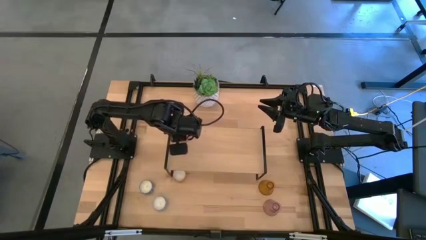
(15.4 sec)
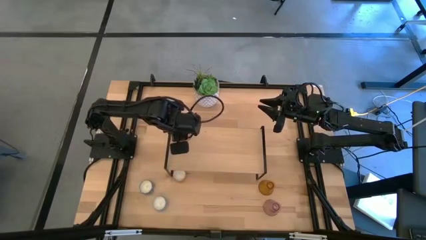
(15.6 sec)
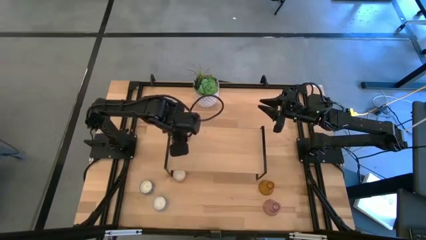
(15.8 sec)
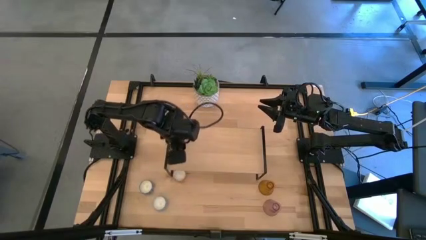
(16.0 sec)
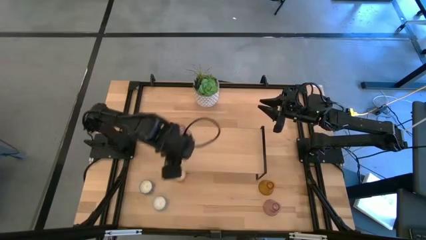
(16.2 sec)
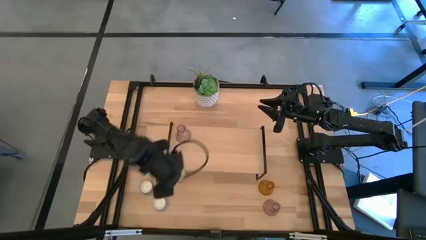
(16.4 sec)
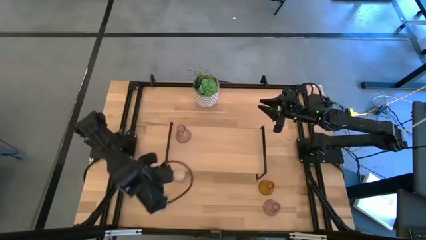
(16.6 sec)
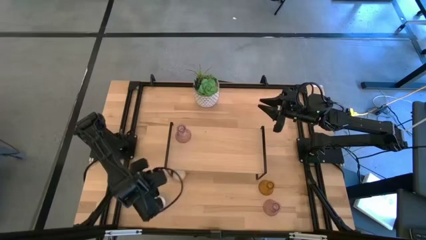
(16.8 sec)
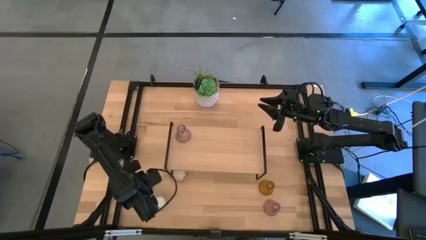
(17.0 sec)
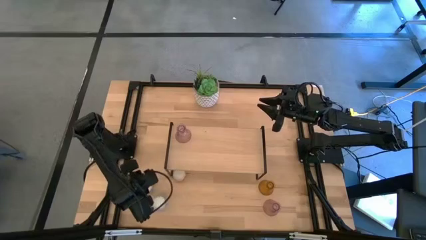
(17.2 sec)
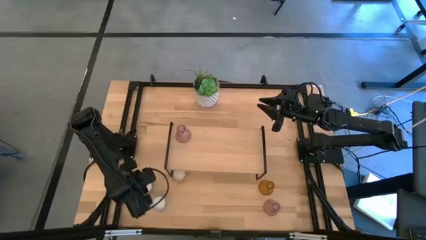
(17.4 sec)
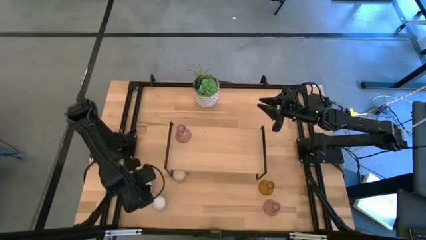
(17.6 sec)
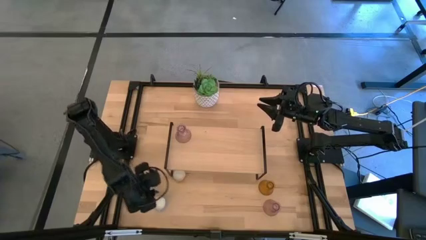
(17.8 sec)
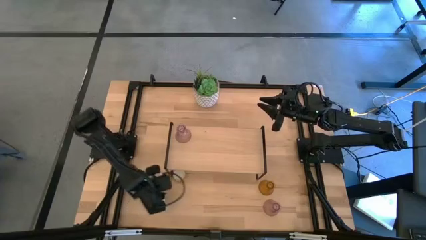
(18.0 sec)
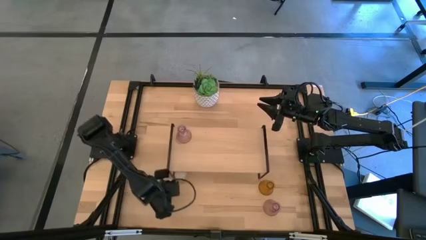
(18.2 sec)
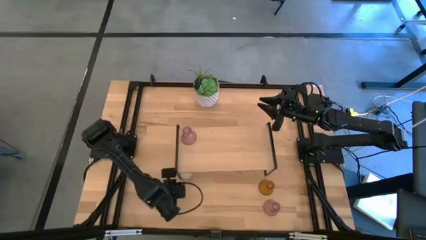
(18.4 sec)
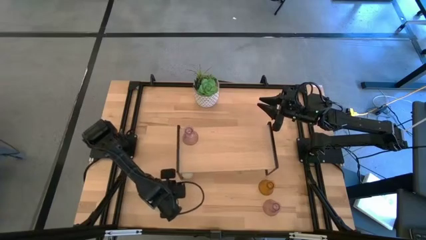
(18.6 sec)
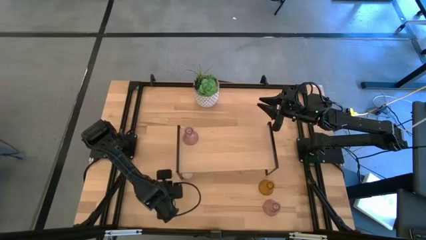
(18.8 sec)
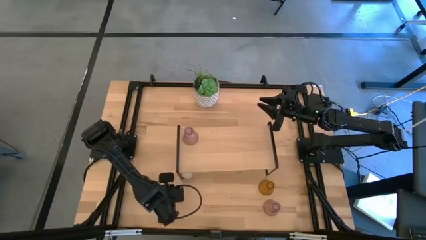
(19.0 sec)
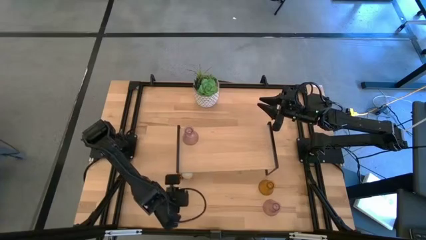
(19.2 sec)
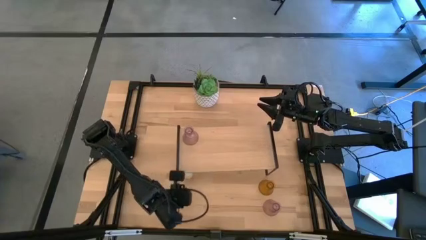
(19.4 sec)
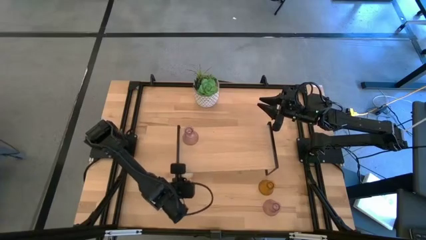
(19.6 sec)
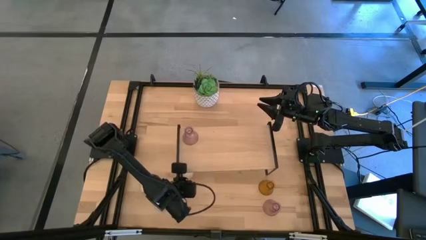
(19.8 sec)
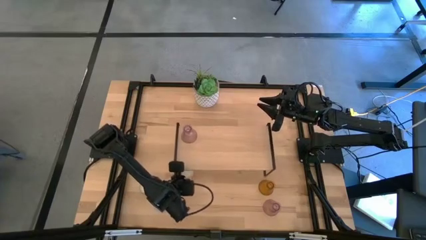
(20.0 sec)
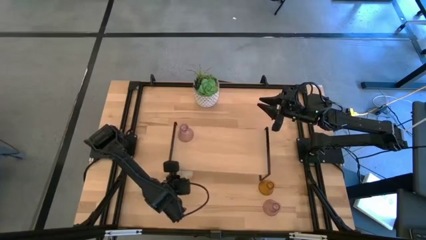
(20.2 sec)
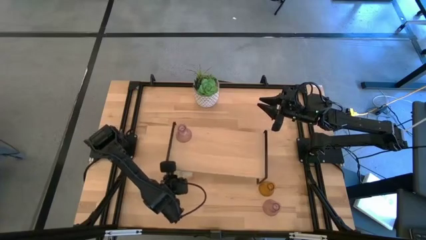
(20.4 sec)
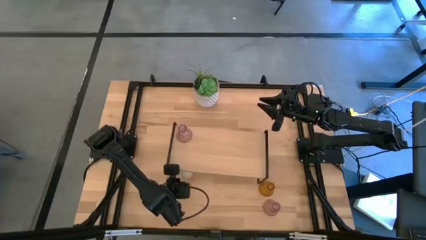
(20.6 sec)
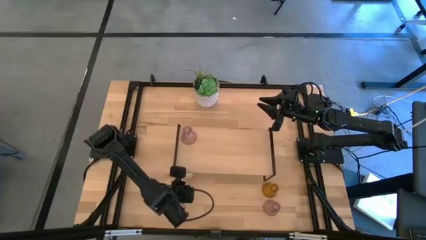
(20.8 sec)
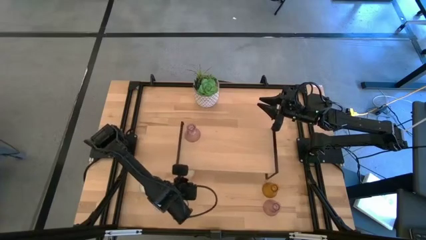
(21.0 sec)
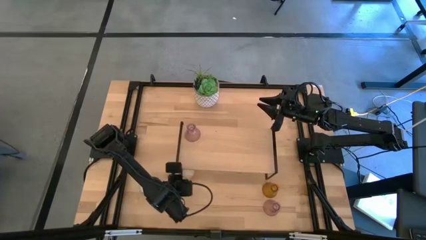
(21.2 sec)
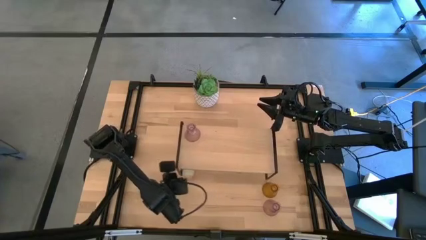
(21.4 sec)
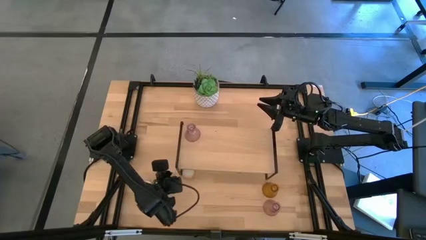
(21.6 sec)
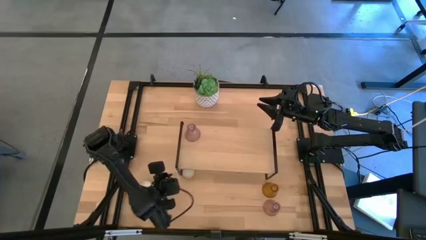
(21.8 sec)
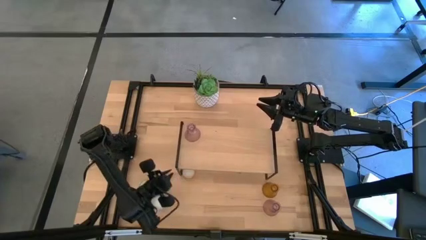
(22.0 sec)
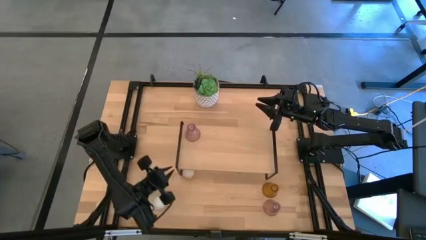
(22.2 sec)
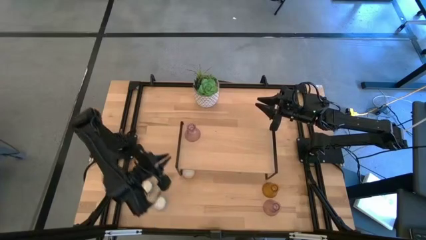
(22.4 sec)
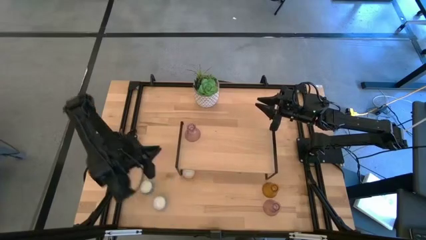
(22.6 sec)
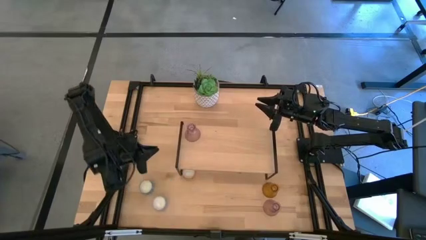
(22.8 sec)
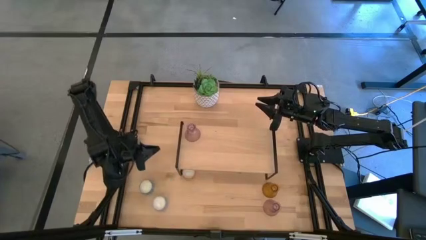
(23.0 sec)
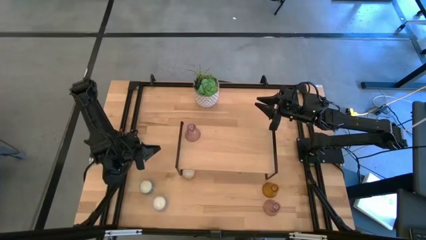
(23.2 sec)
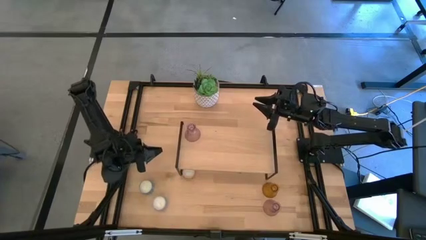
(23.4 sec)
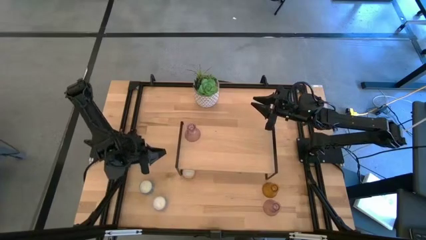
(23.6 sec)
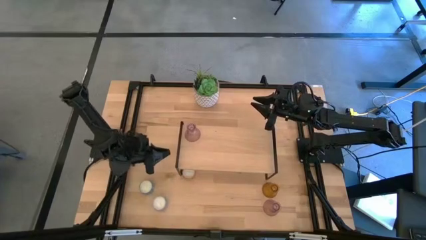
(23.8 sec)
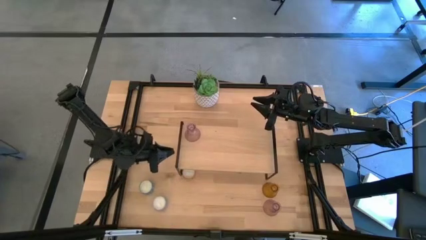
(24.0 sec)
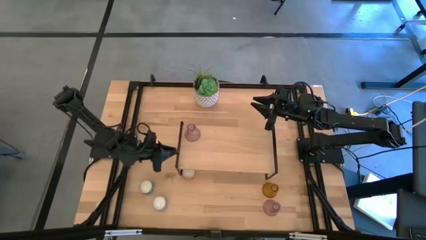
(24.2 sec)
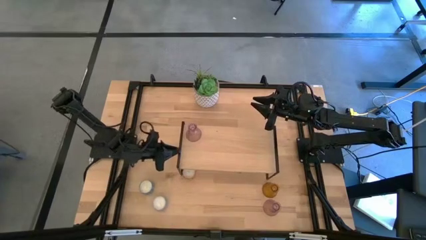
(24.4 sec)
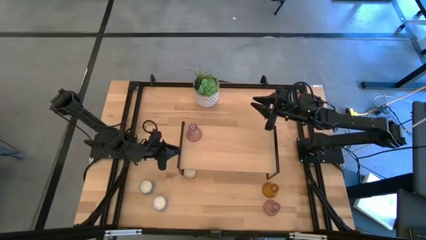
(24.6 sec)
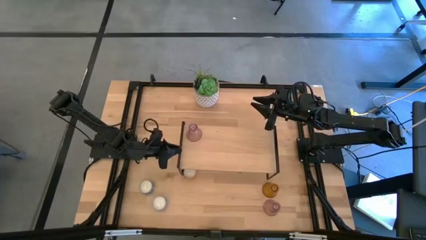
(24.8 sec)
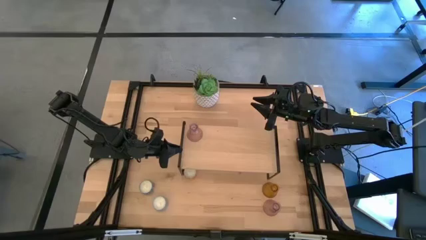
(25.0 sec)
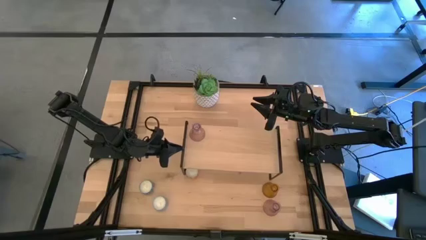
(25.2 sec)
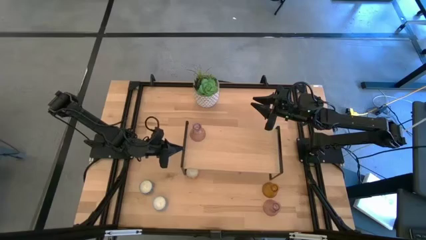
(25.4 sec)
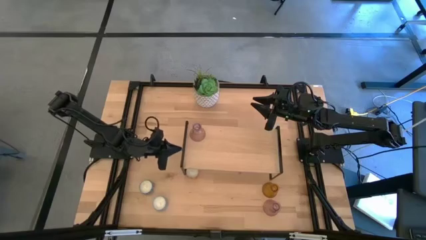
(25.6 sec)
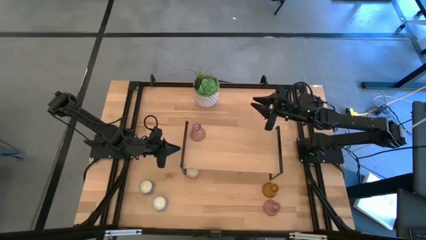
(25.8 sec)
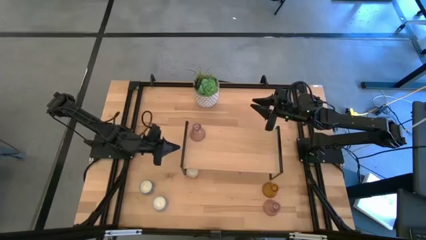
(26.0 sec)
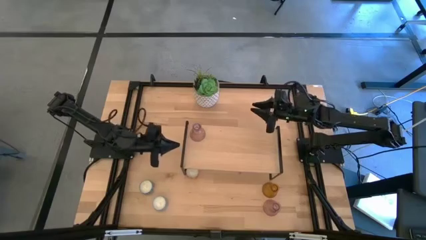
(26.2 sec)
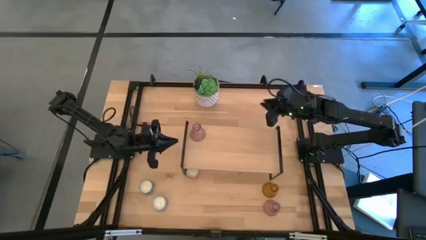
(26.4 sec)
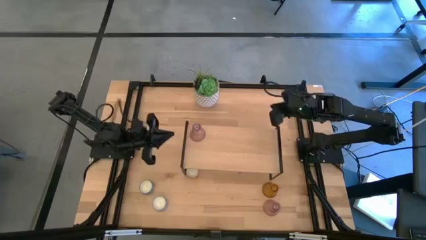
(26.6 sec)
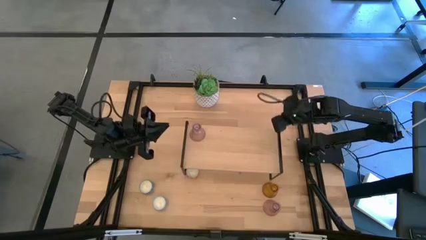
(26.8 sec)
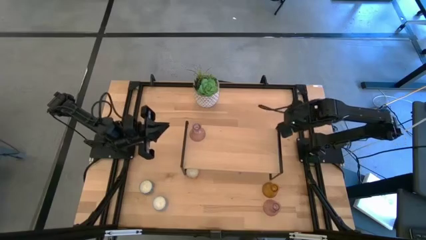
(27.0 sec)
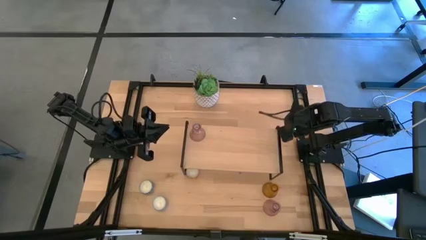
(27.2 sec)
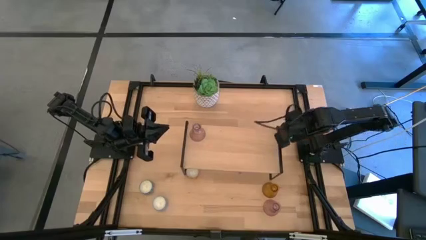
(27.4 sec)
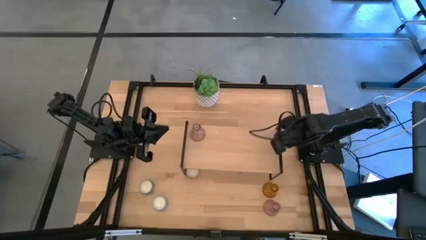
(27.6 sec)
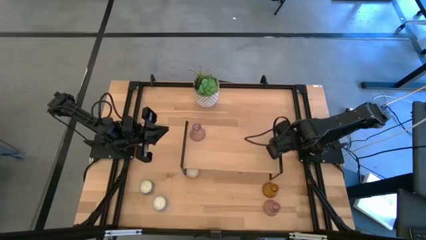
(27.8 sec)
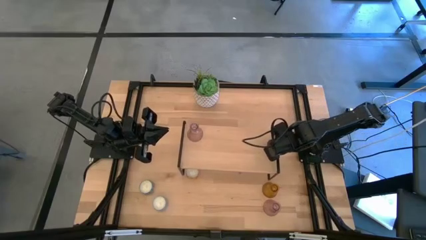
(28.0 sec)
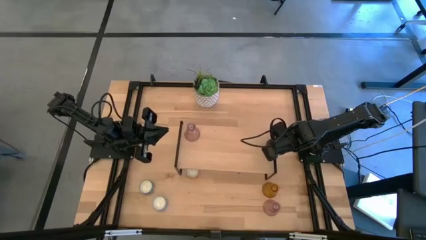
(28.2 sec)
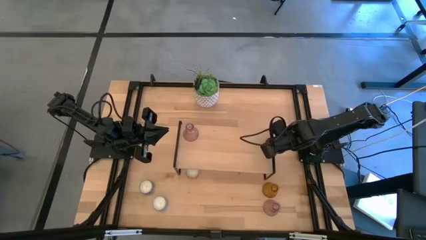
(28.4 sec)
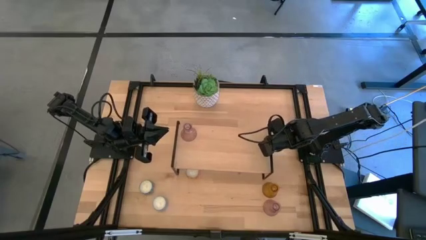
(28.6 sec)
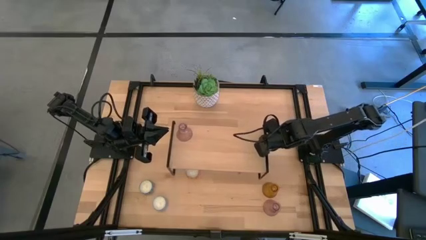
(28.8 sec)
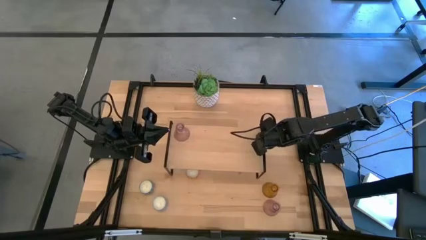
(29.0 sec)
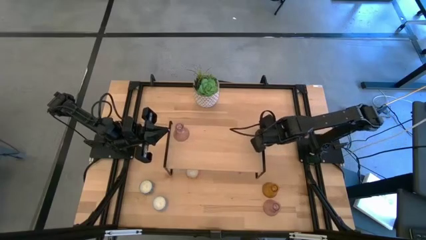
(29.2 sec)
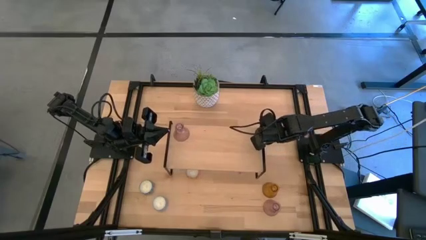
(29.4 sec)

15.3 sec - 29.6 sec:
Task: Pick & Place candle stick holders
Adjust the shelf

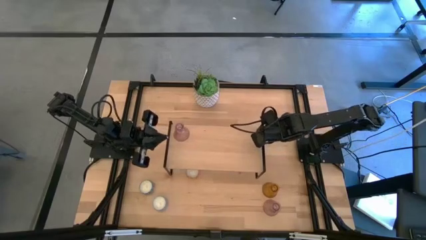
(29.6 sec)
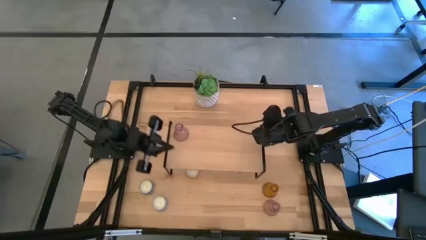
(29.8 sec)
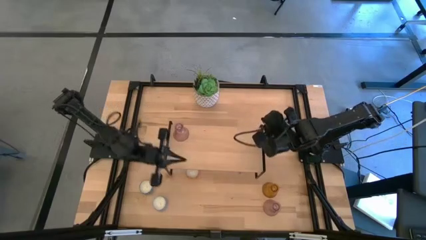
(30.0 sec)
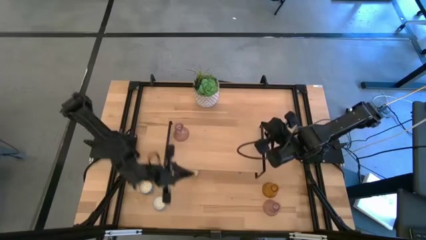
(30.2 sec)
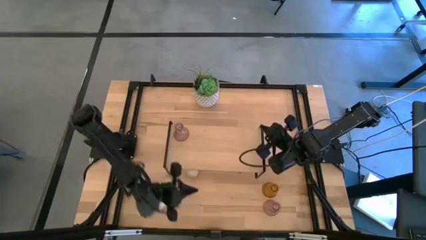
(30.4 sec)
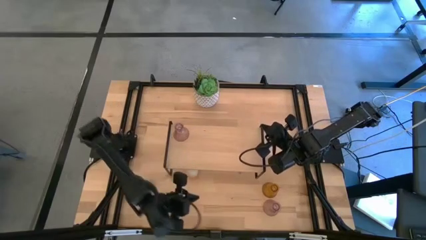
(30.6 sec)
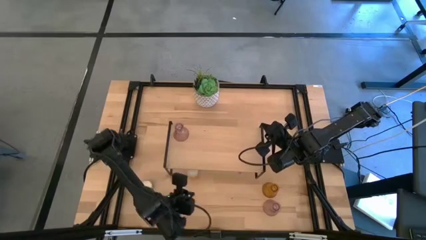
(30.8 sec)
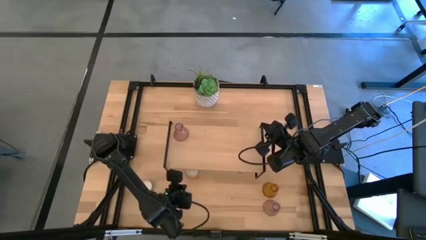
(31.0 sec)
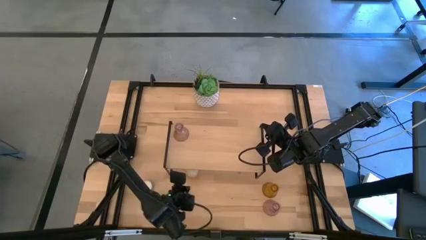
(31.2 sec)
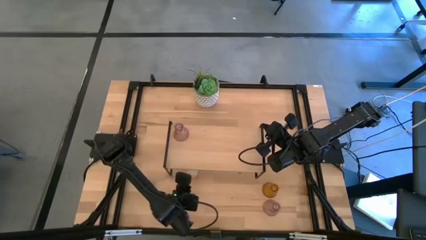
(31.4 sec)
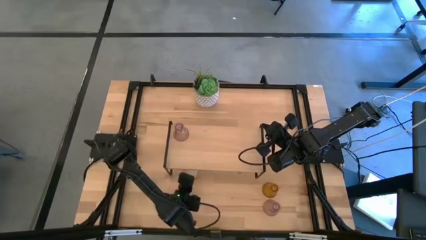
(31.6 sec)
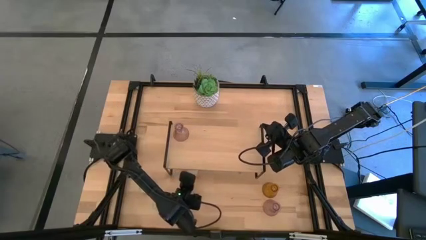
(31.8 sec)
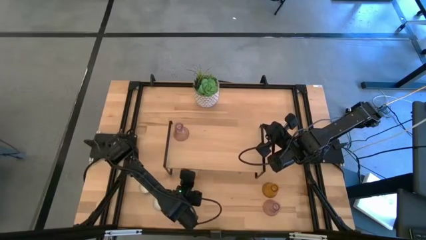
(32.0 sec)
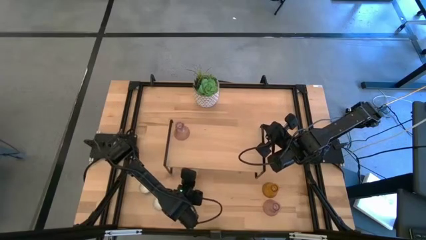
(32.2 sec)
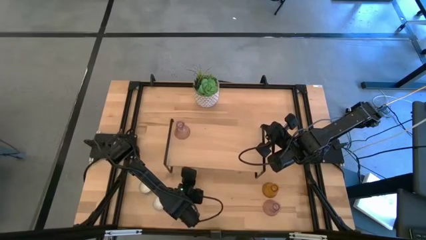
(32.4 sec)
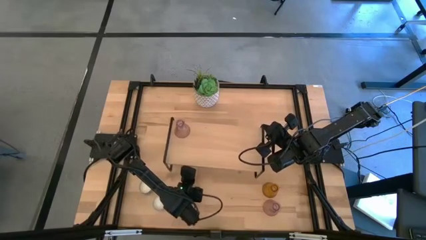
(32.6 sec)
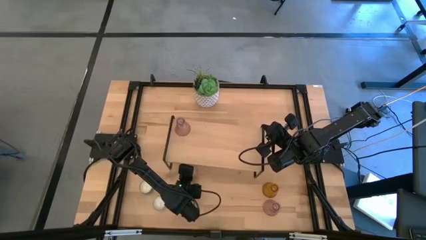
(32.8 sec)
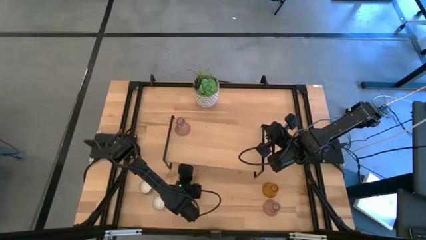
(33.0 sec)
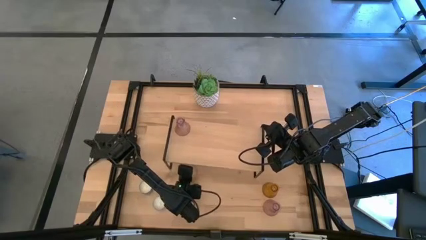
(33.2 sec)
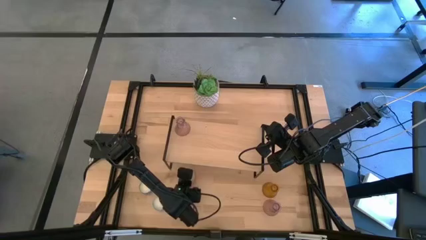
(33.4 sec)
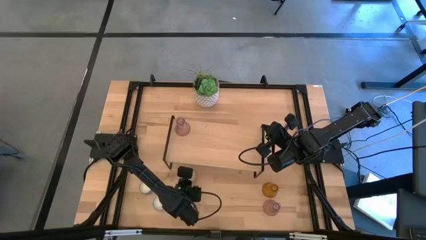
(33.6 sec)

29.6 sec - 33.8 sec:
Put the yellow scented candle on the shelf
